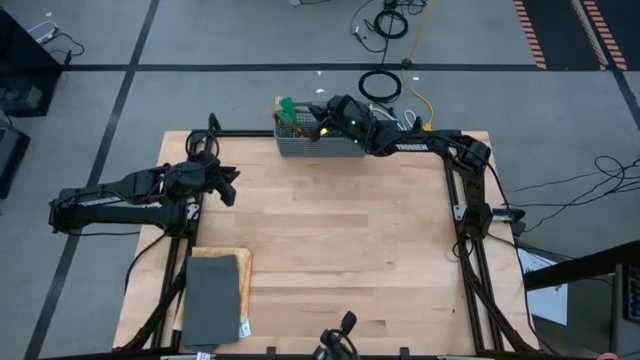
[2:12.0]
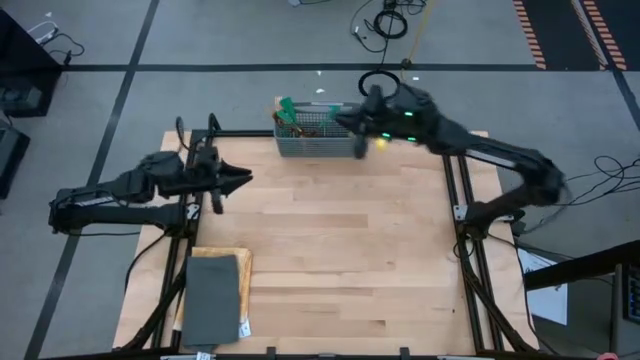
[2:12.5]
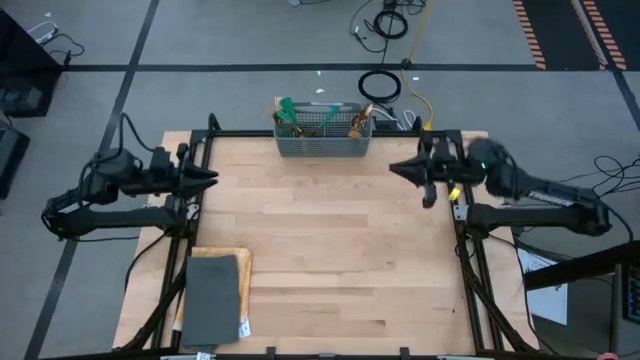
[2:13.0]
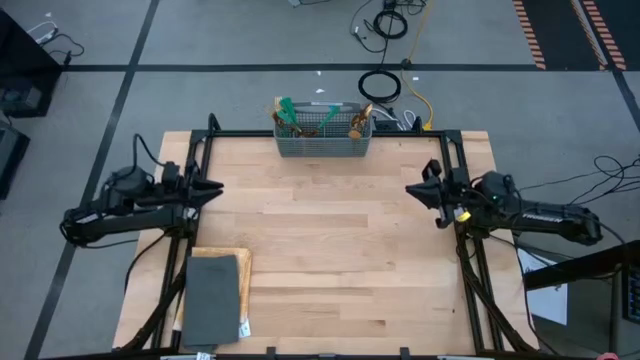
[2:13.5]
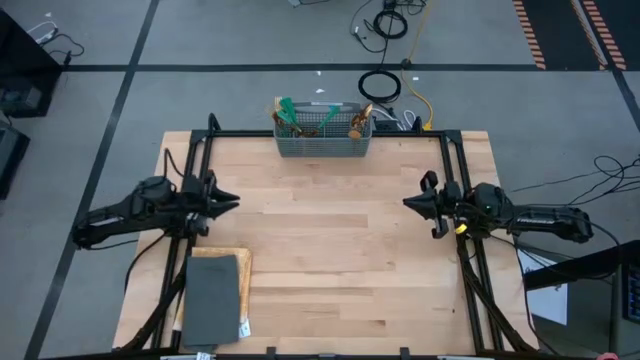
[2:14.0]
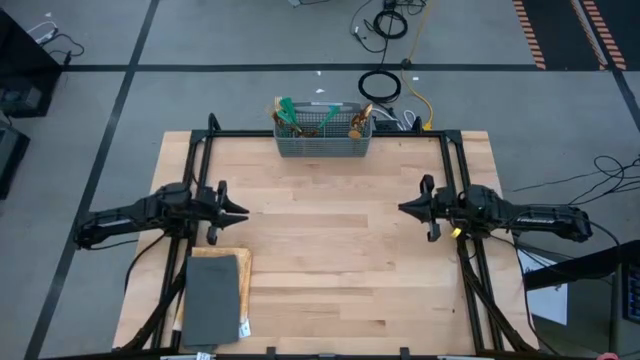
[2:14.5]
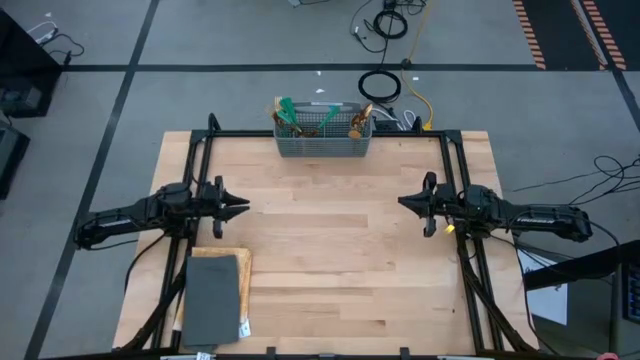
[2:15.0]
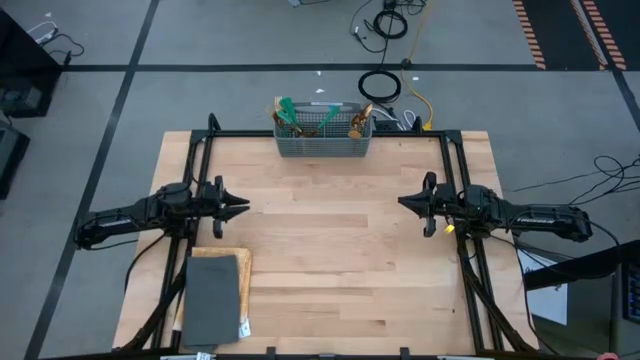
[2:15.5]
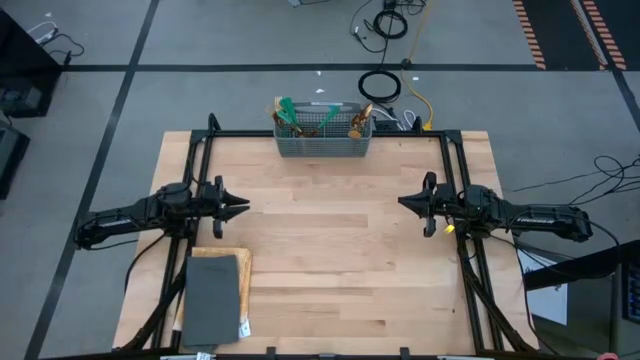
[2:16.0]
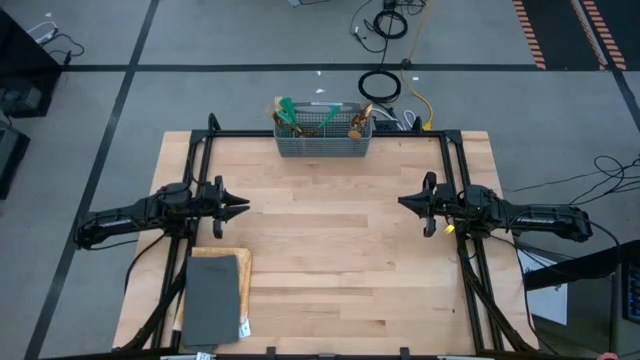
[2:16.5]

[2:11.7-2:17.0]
Task: Sort silverware
Return to Home Position

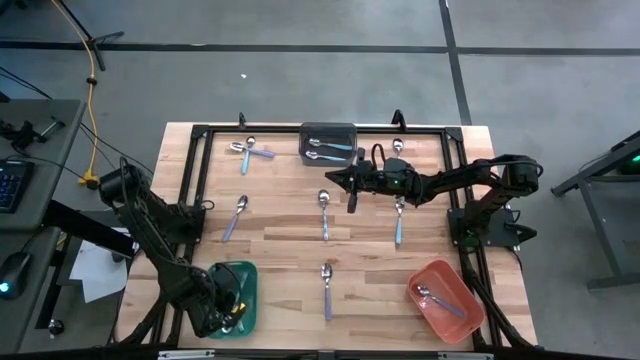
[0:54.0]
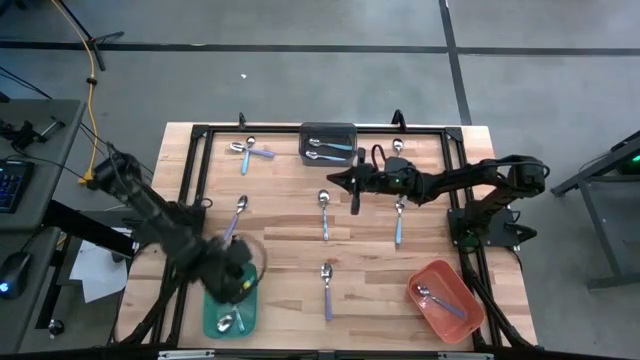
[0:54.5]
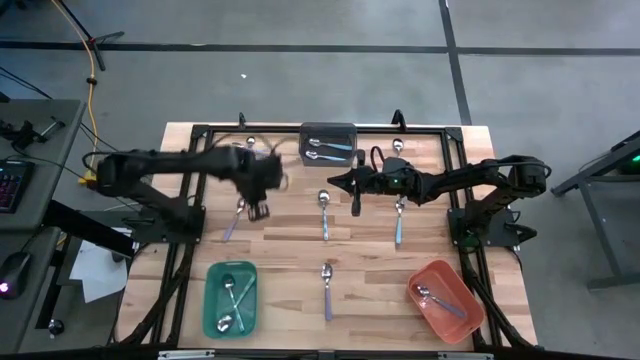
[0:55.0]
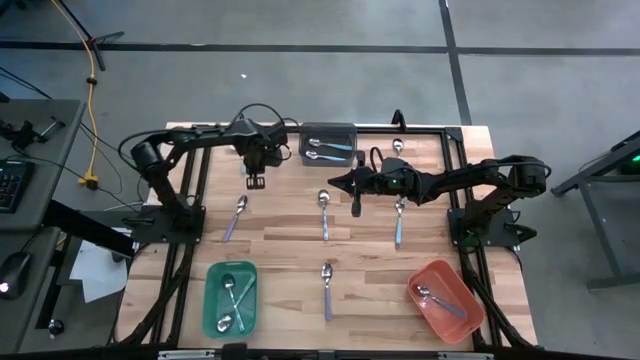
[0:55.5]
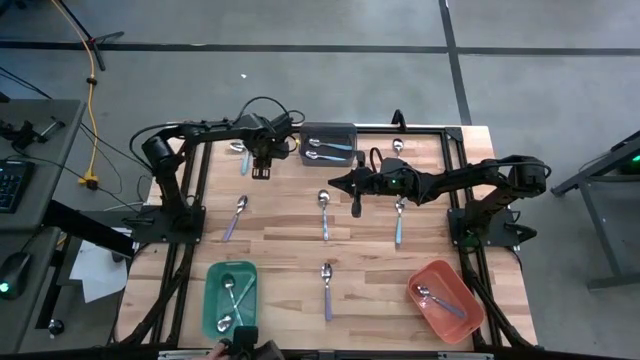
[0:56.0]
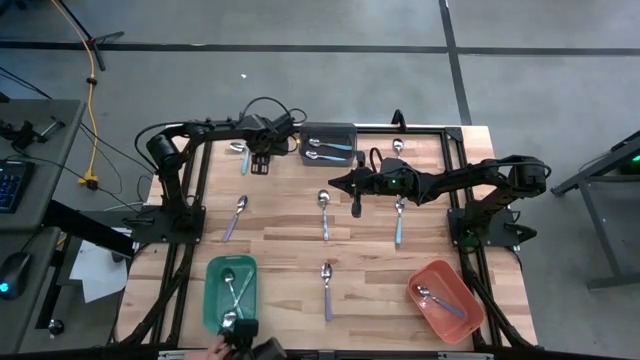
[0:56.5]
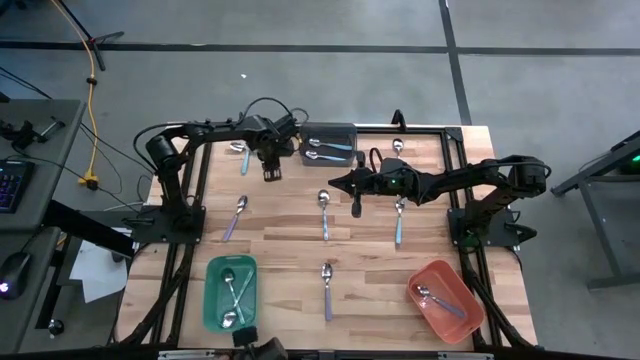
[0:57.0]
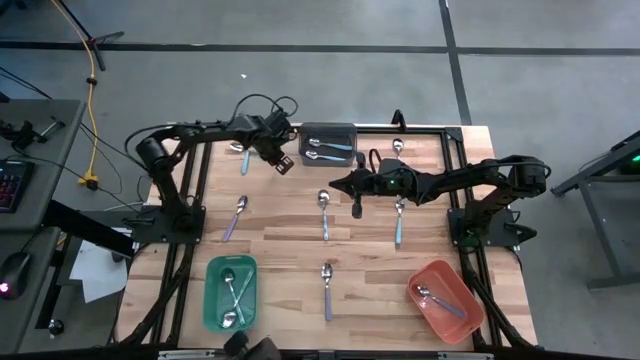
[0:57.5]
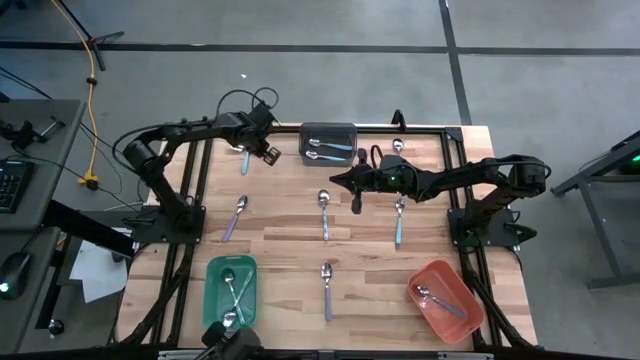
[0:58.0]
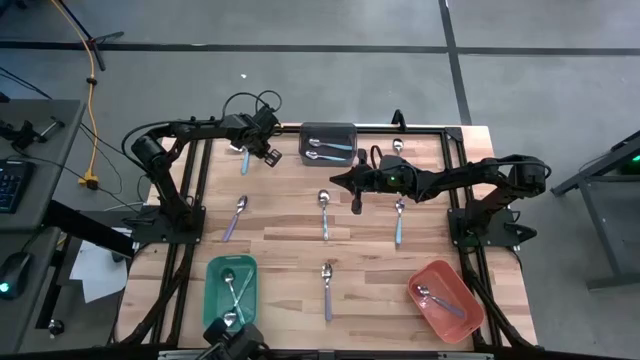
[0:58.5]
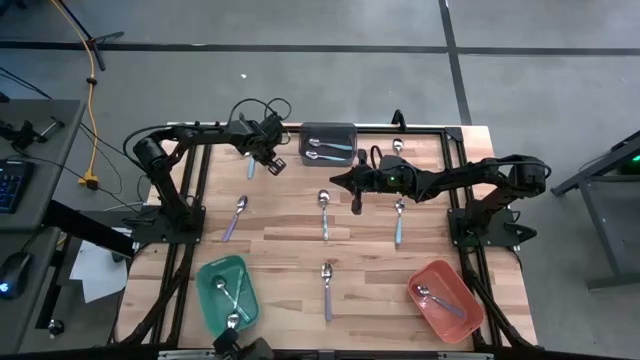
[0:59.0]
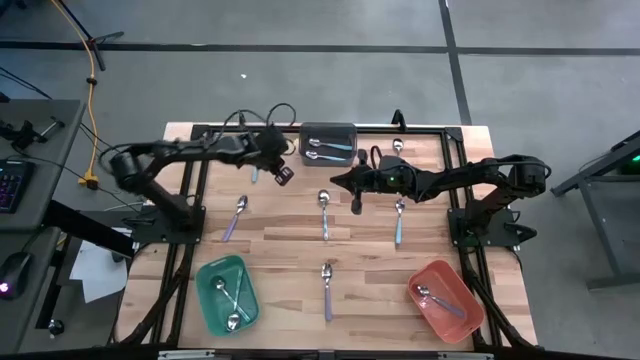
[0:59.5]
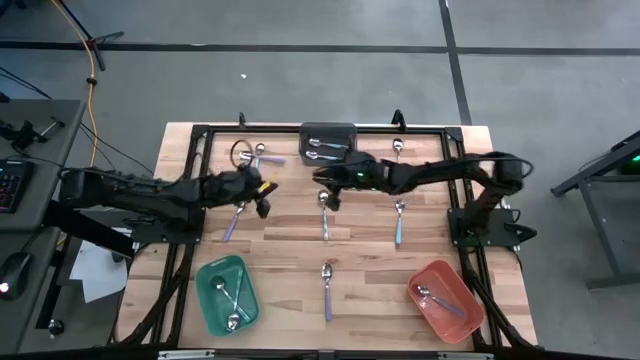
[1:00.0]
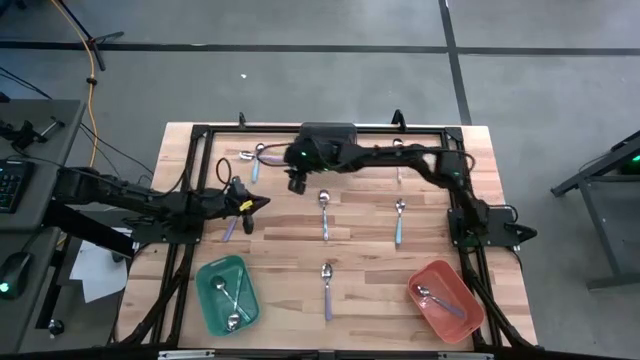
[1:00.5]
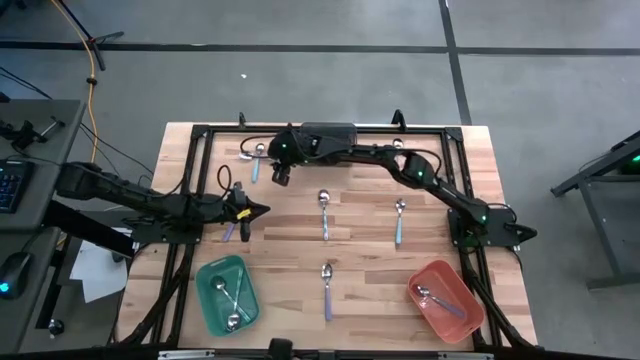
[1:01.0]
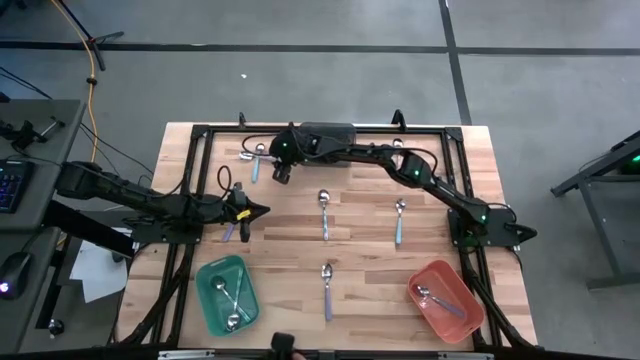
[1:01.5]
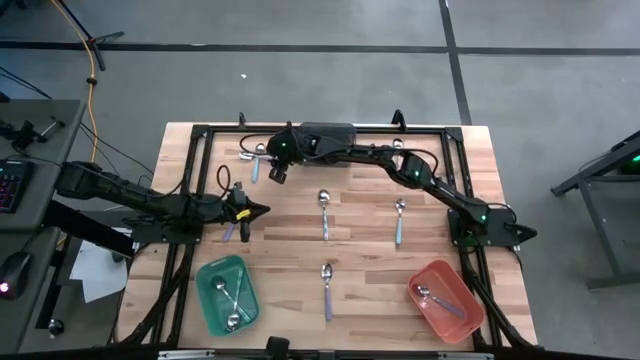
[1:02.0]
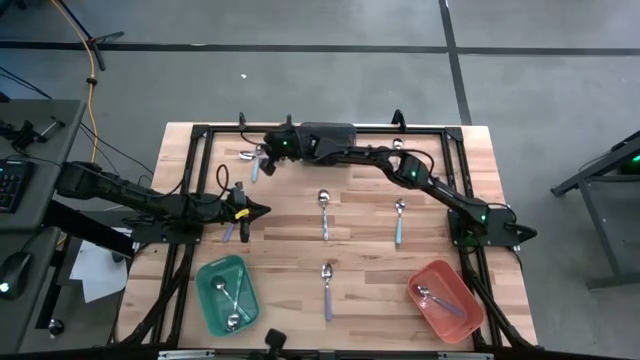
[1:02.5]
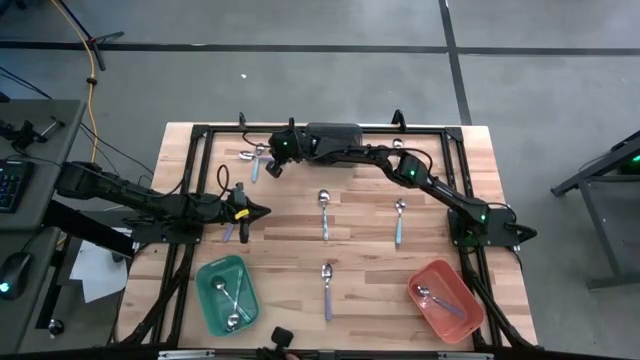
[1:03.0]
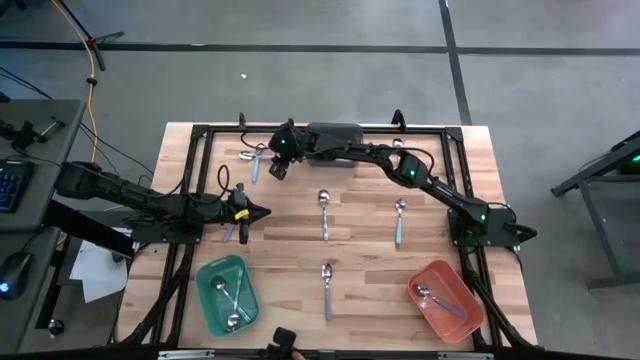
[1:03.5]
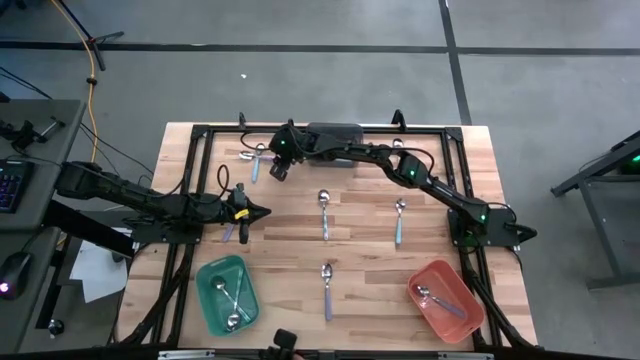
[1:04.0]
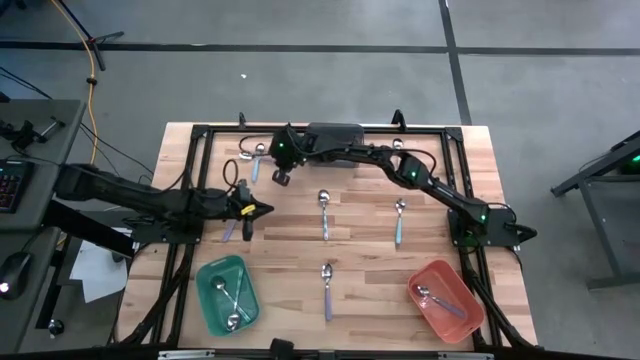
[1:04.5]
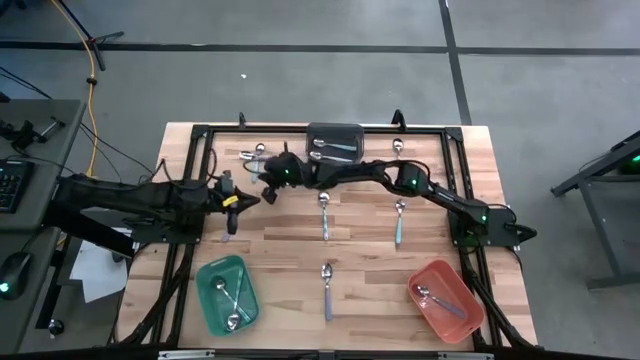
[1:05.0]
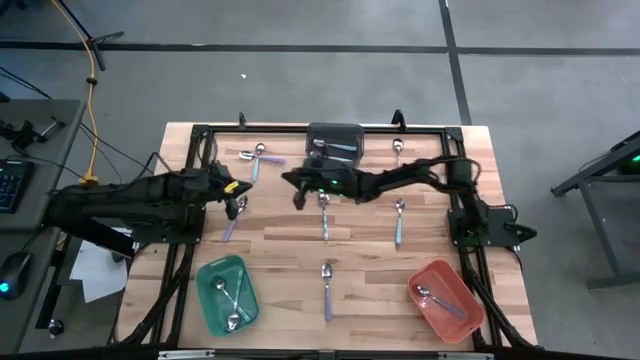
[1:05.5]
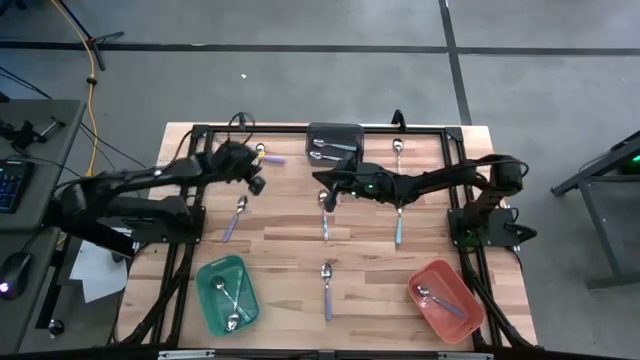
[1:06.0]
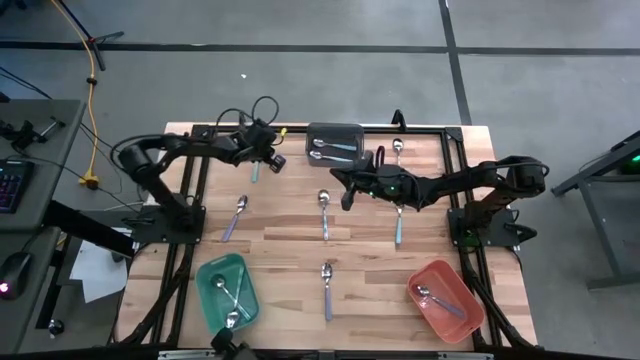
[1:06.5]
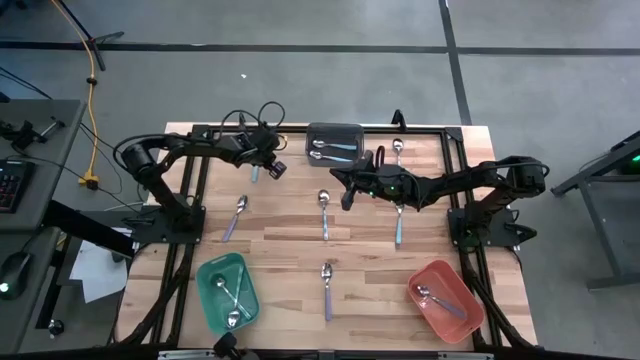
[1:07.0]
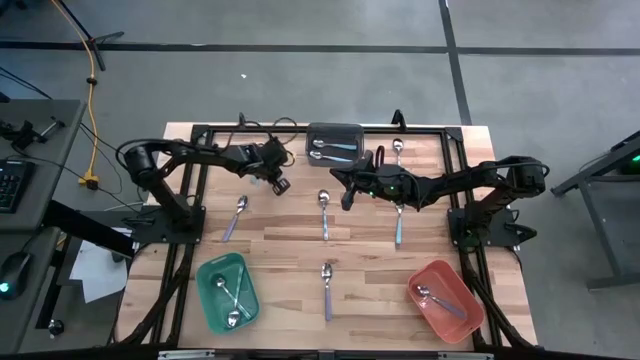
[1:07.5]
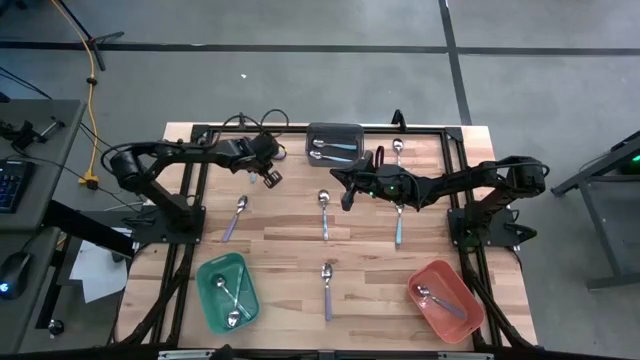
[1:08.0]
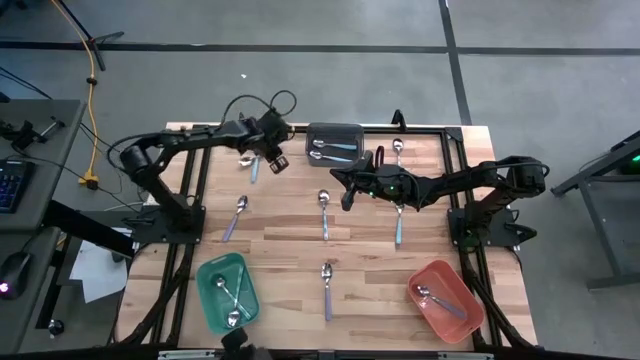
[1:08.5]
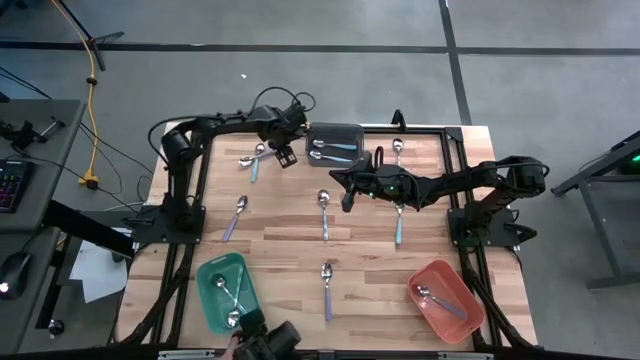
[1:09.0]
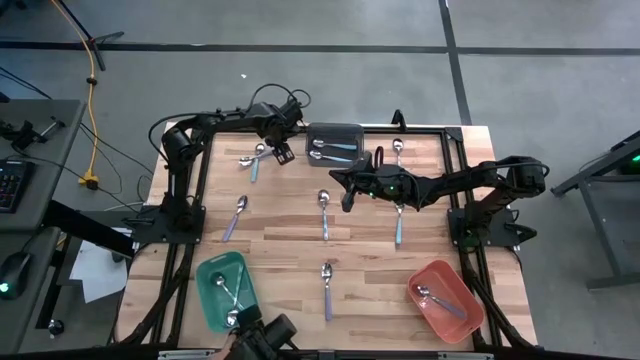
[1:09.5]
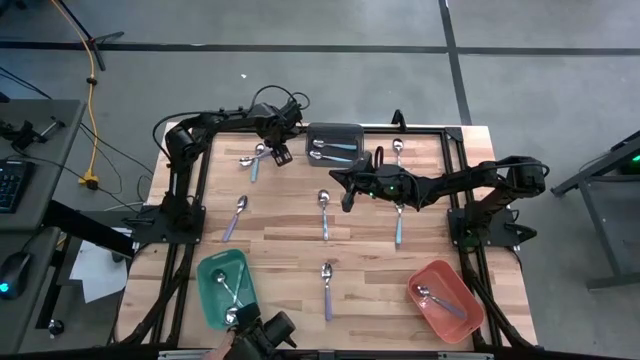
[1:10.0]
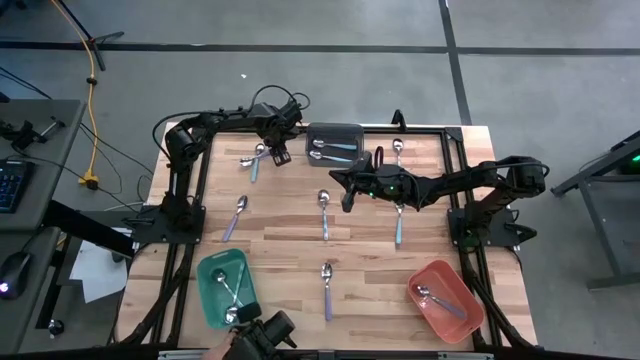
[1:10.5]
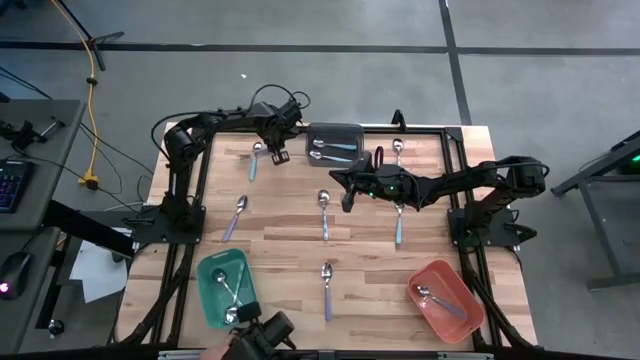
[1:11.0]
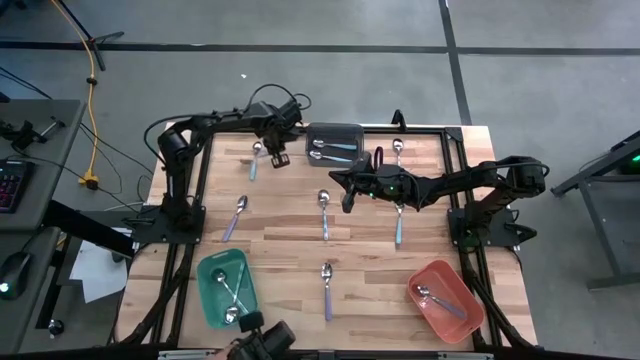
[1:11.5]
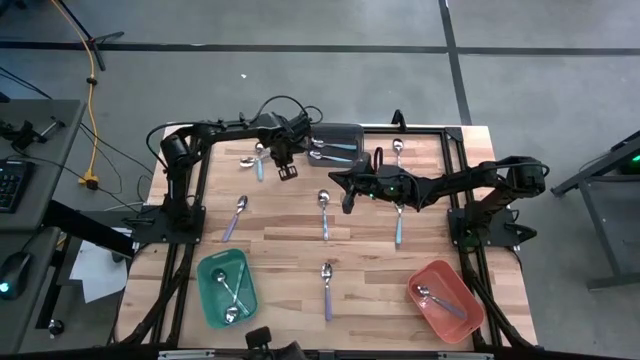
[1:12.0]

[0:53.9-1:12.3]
Task: Sort silverware by color (type)
Put the purple spoon into the orange bin
